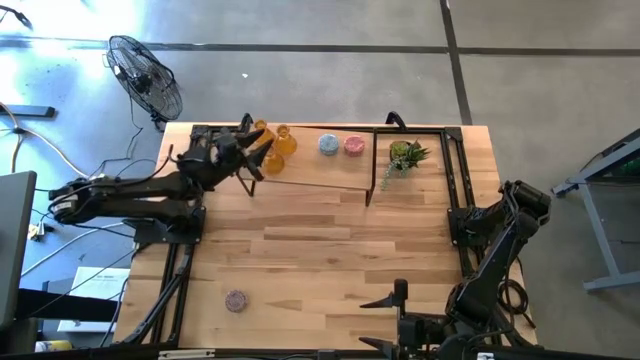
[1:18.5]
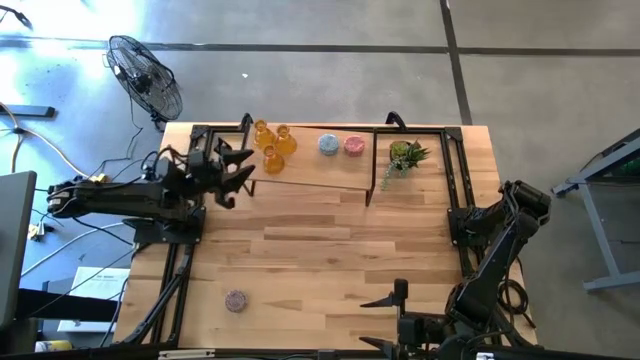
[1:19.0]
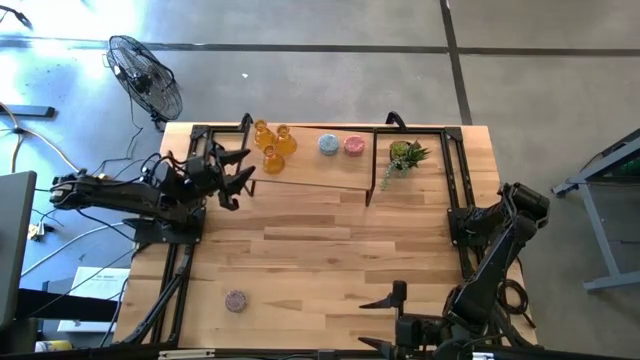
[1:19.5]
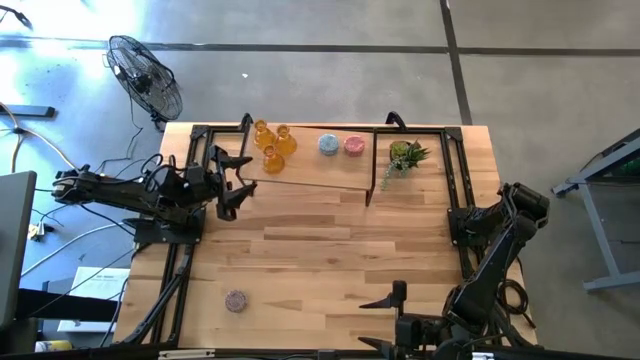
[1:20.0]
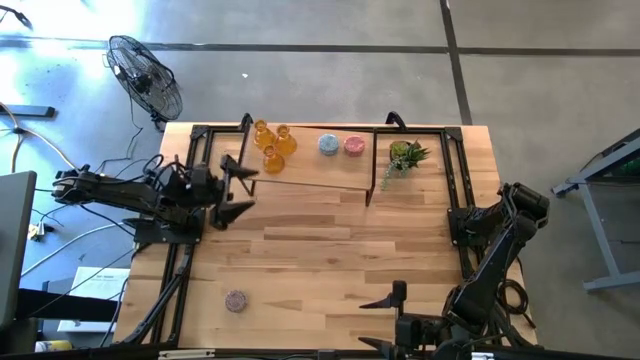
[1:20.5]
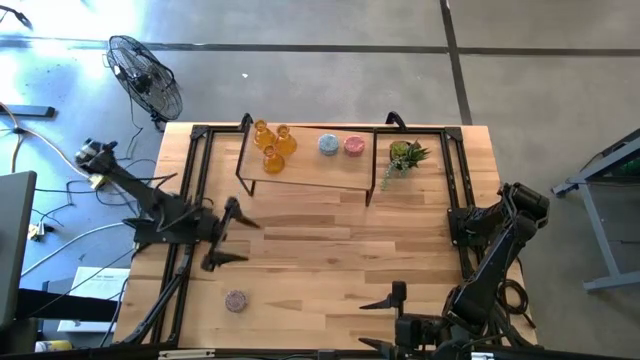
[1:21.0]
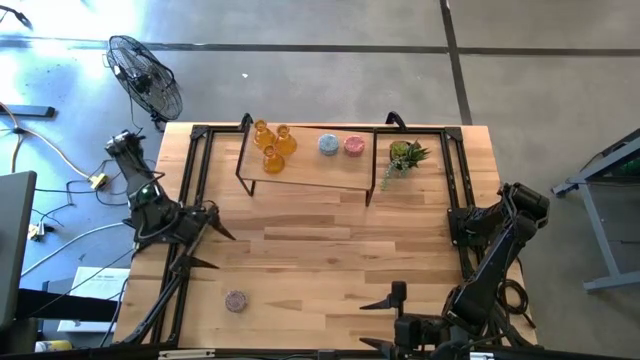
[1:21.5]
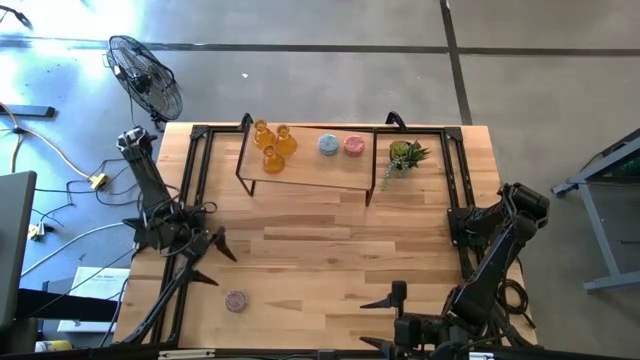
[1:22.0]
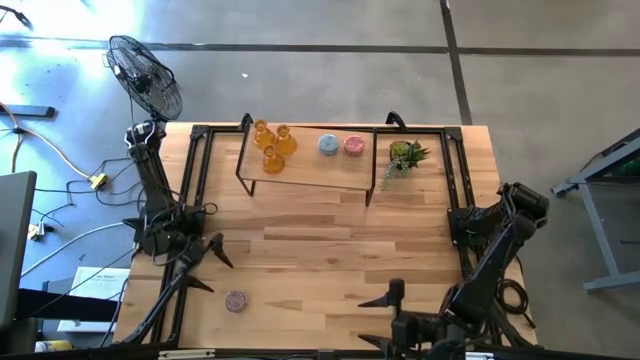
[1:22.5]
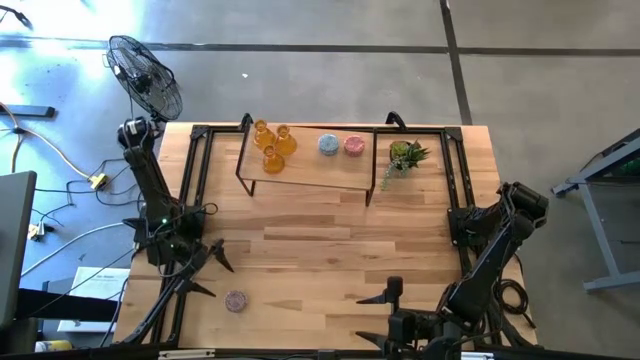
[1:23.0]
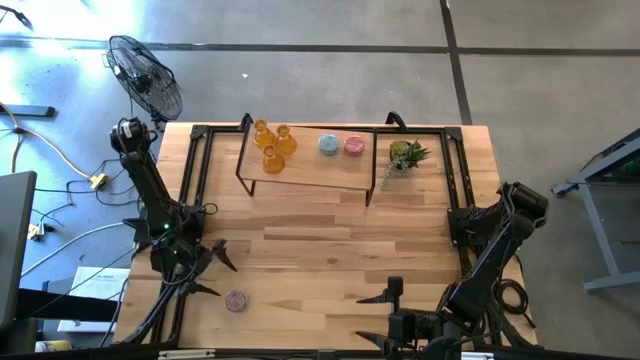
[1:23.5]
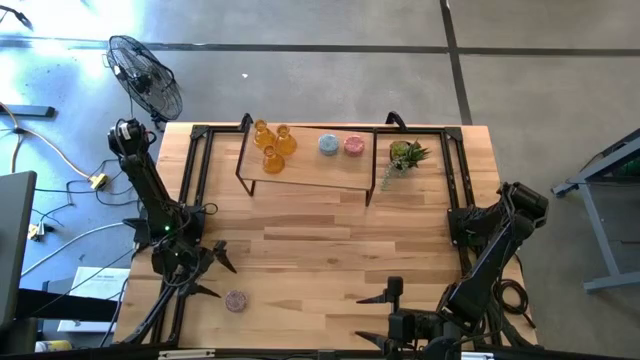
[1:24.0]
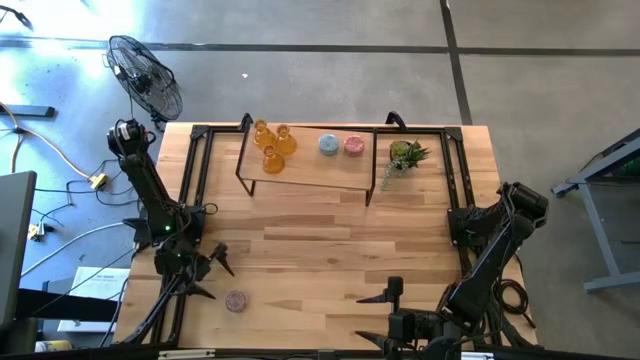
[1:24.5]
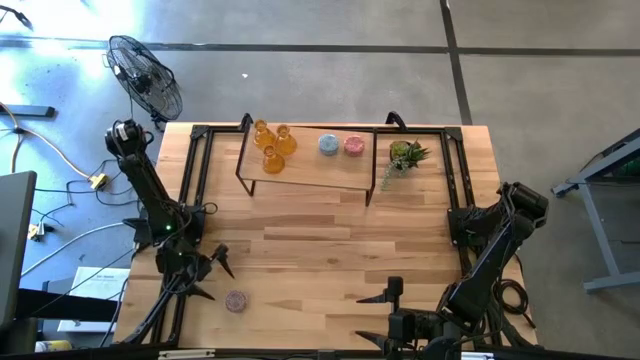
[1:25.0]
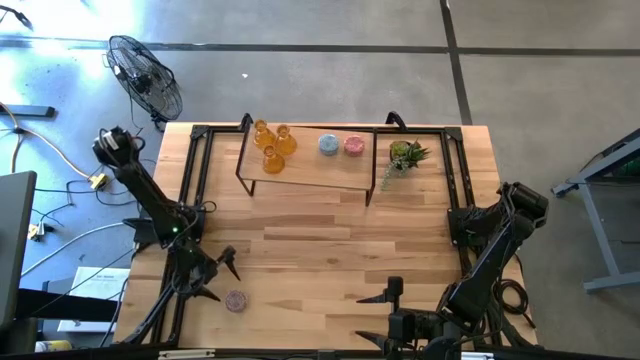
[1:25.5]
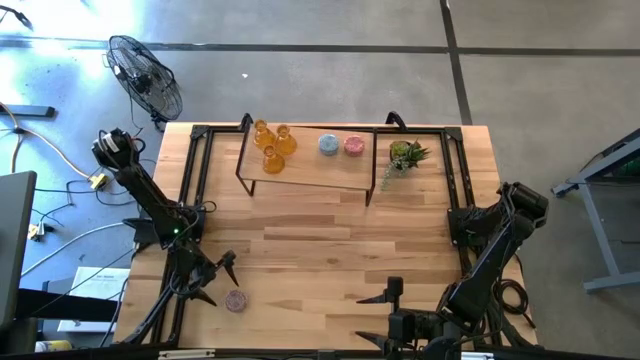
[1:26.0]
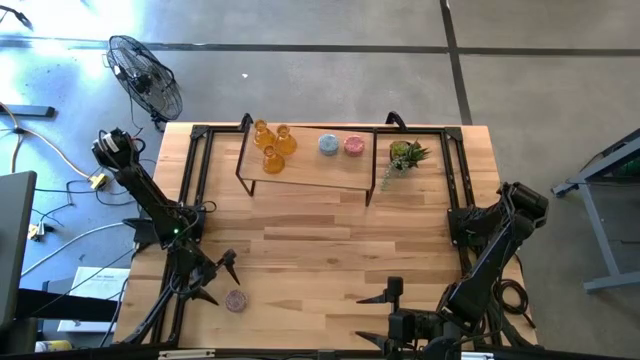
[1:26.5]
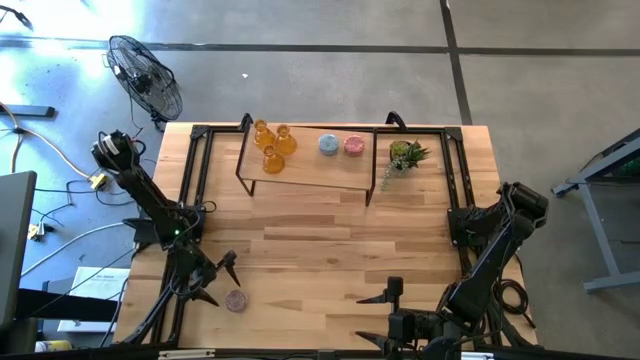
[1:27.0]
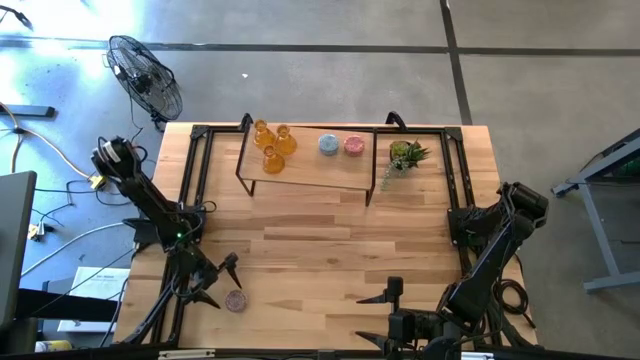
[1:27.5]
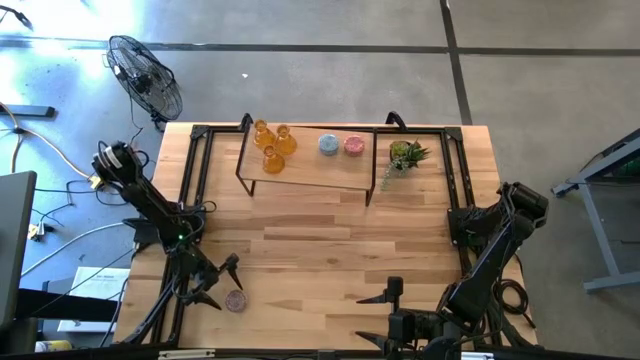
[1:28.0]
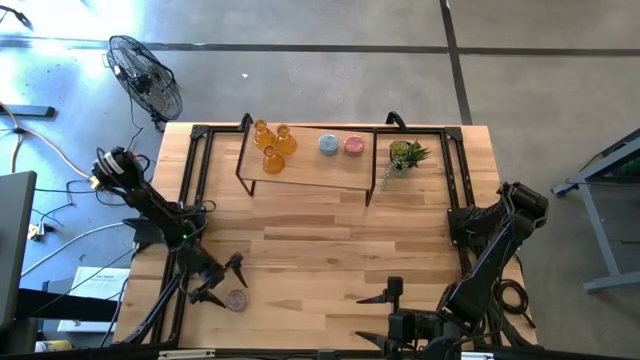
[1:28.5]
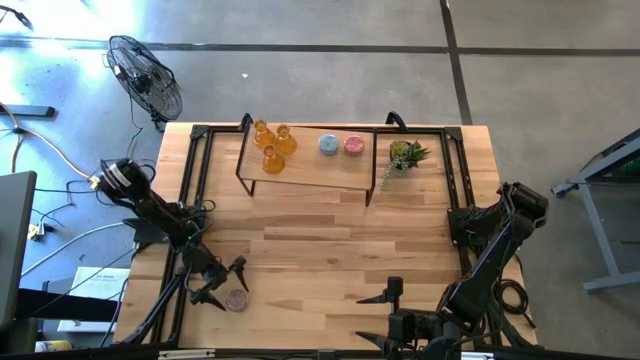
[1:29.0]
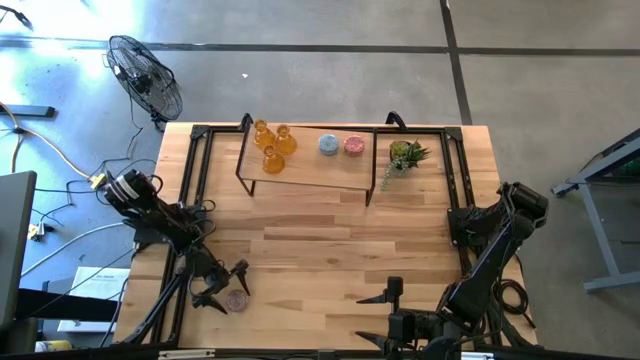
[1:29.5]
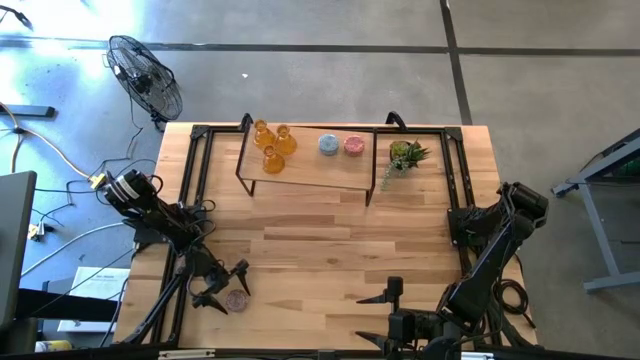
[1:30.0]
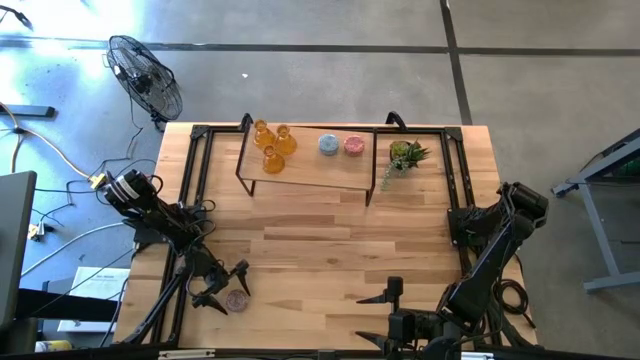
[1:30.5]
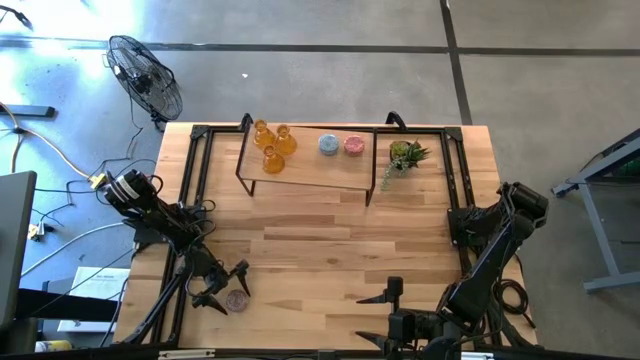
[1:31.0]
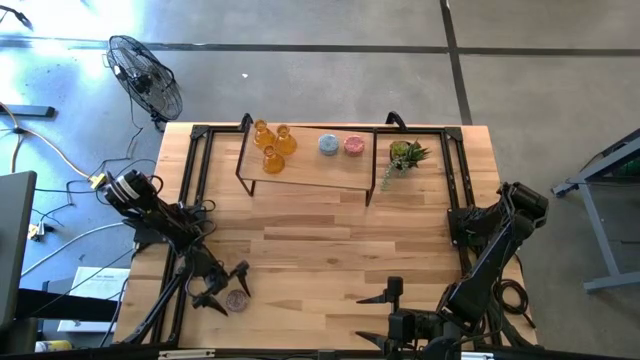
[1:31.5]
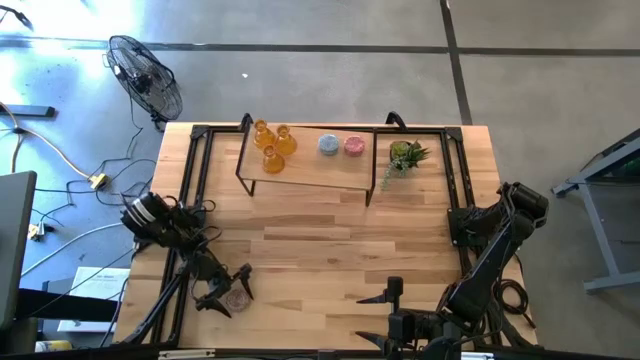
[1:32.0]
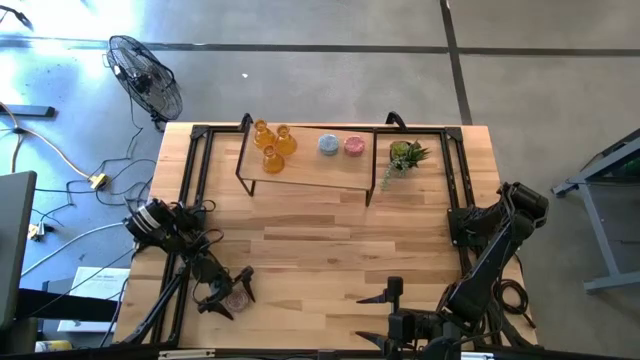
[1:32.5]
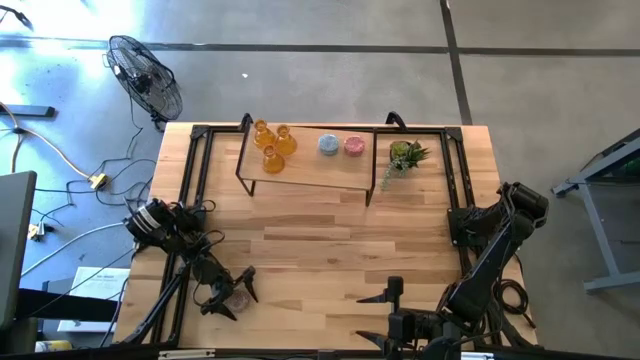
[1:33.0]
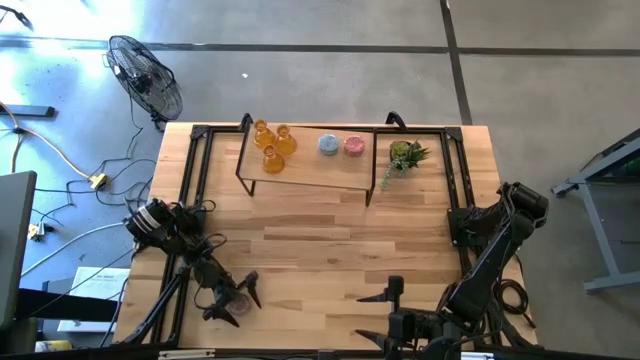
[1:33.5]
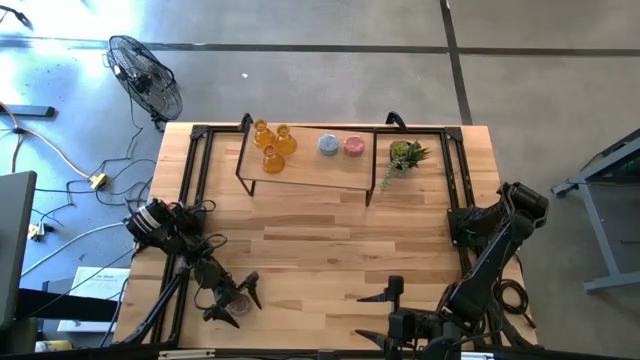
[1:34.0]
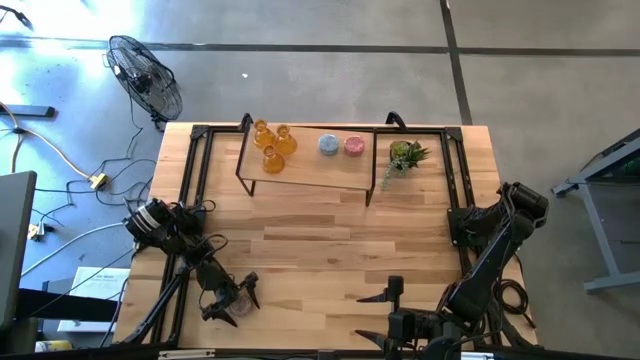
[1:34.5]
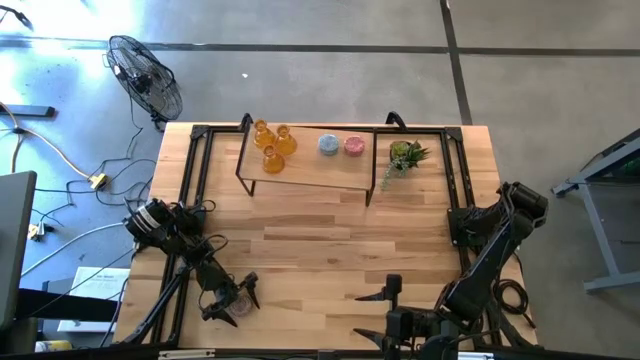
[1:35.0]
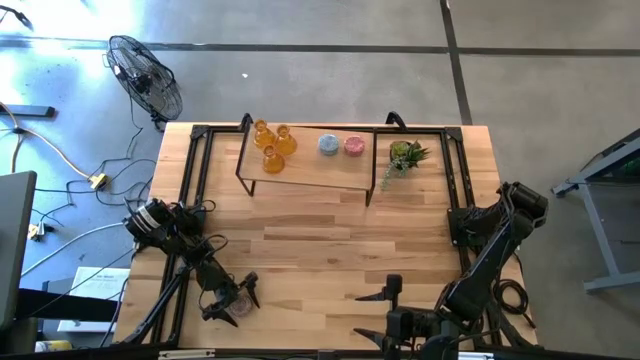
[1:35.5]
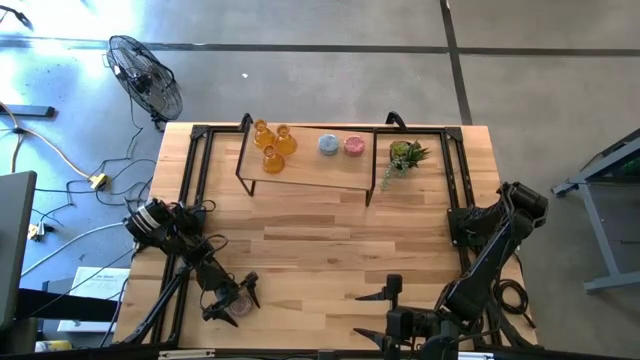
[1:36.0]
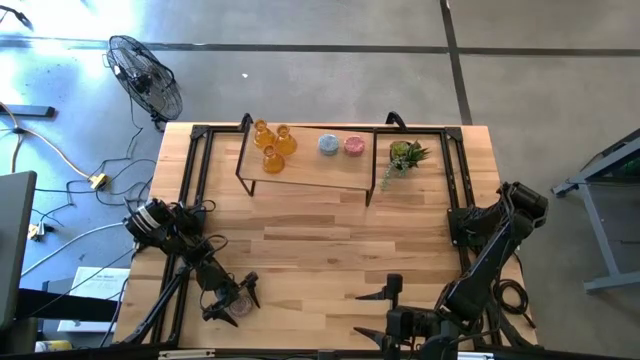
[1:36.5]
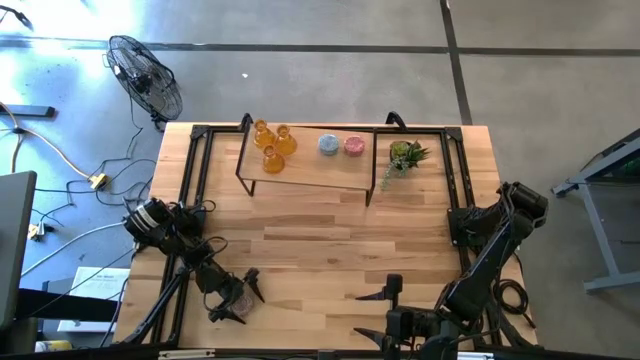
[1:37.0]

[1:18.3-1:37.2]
Task: Pick & Place candle stick holders
Put the red scented candle on the shelf

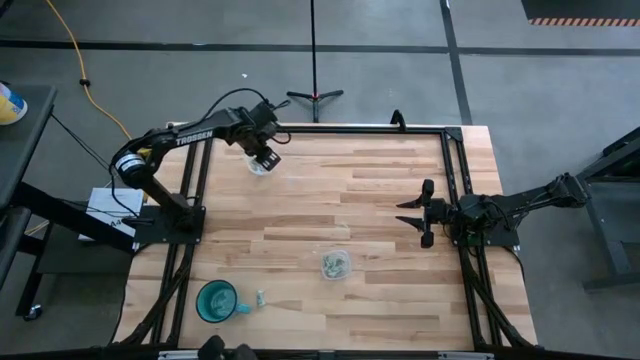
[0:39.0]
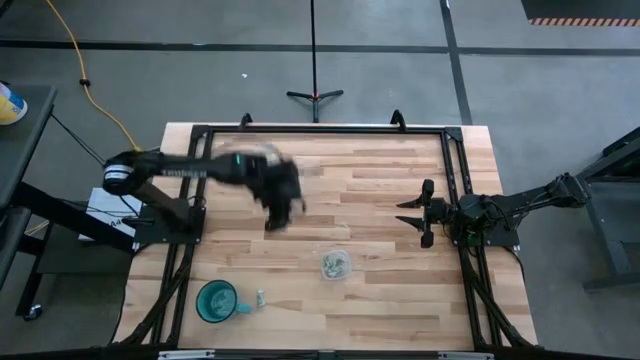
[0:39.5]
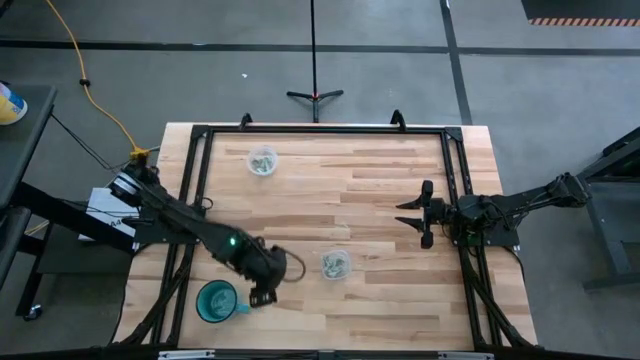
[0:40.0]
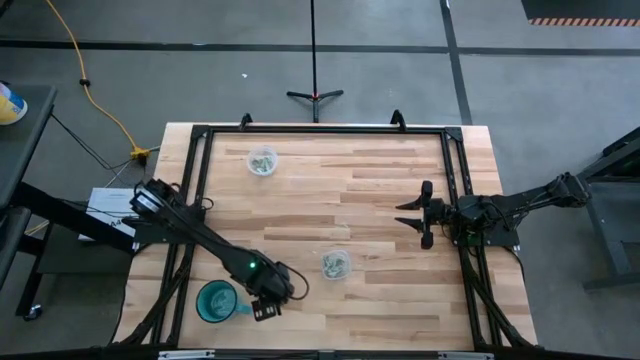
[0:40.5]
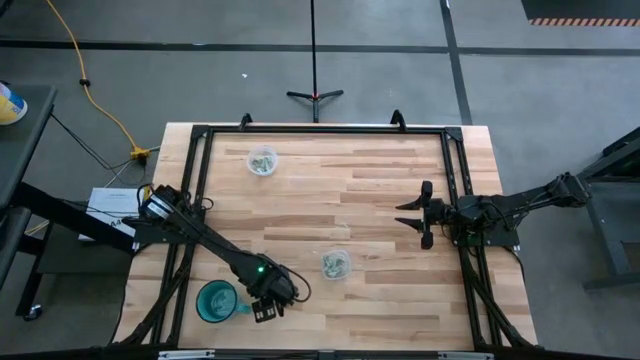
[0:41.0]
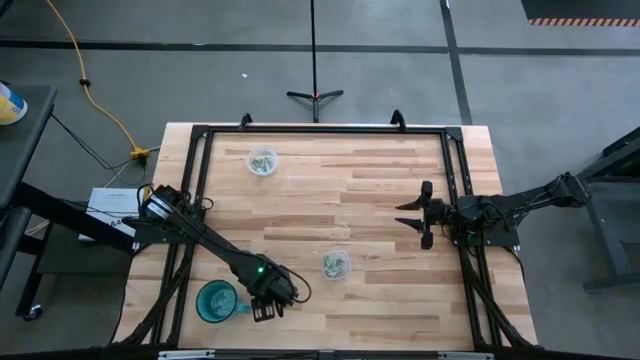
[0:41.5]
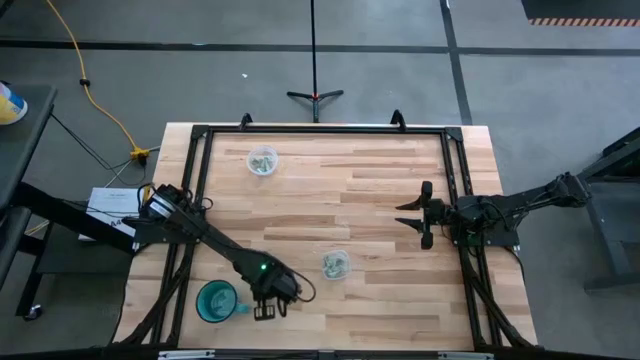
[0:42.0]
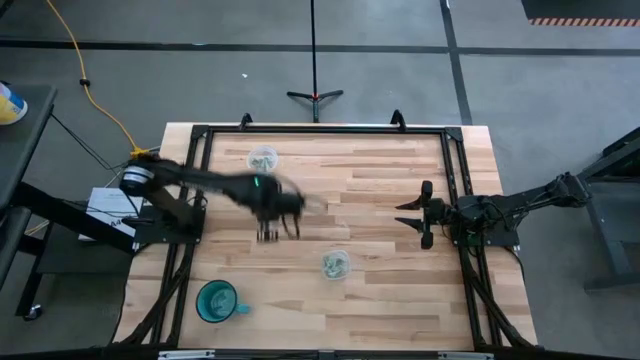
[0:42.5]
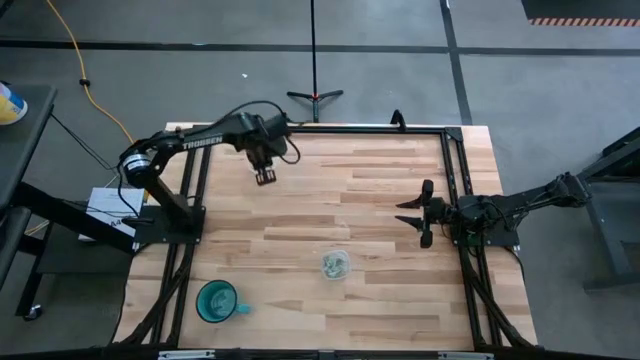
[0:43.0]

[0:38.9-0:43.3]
Task: Pick and place Stevia / Truvia into bins
Put the stevia packet into the bottom transparent container
